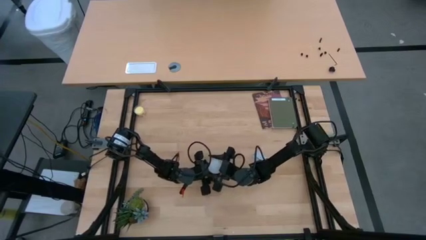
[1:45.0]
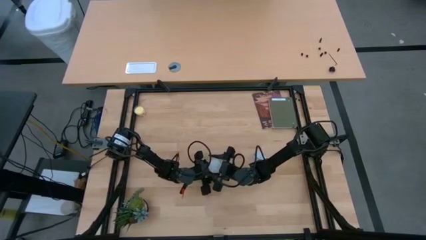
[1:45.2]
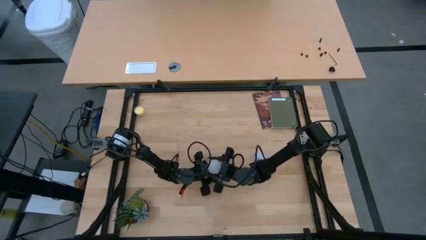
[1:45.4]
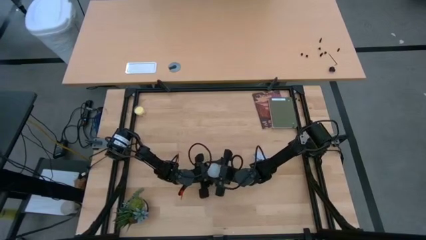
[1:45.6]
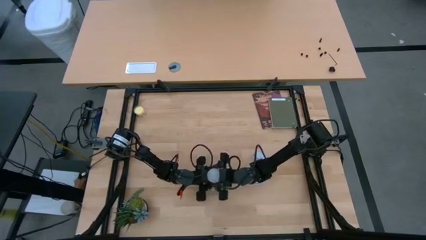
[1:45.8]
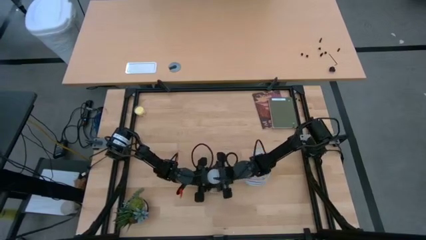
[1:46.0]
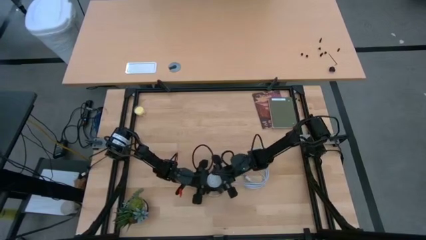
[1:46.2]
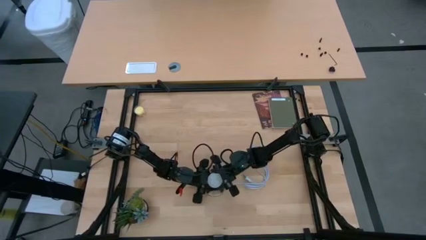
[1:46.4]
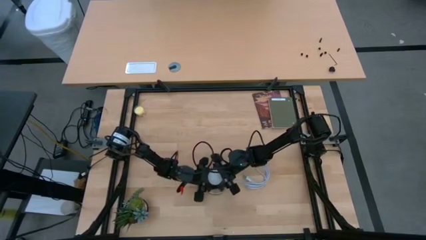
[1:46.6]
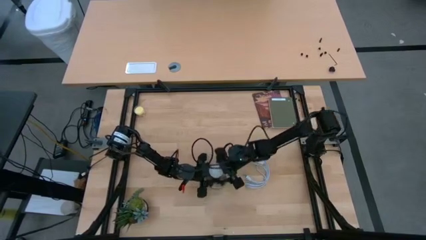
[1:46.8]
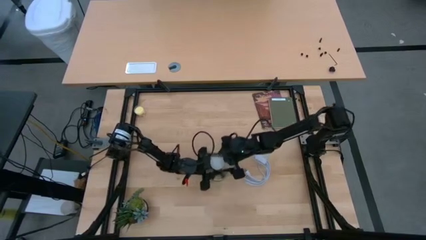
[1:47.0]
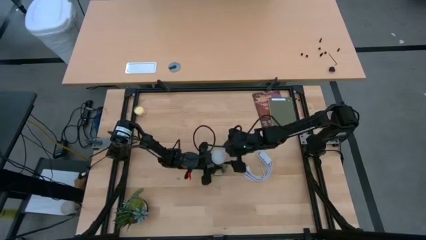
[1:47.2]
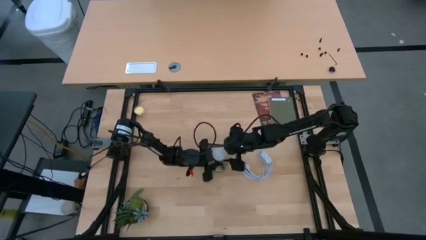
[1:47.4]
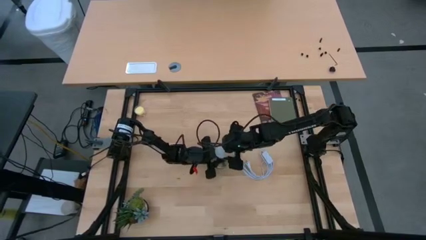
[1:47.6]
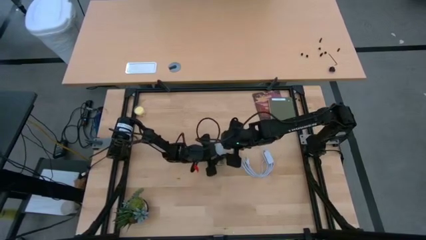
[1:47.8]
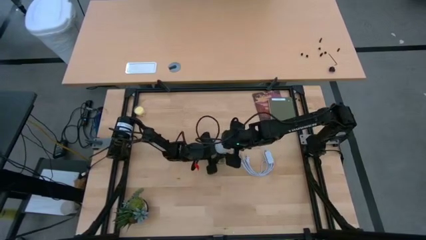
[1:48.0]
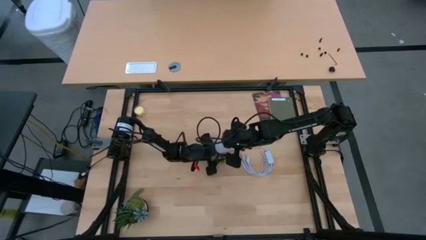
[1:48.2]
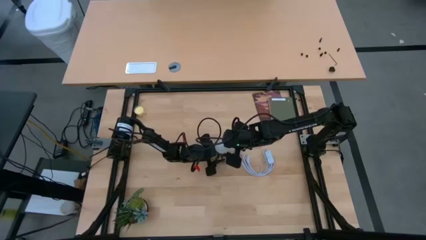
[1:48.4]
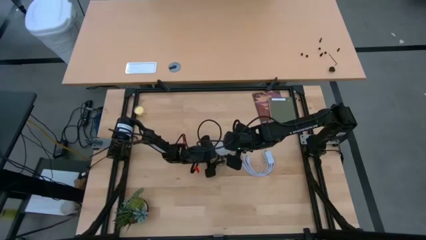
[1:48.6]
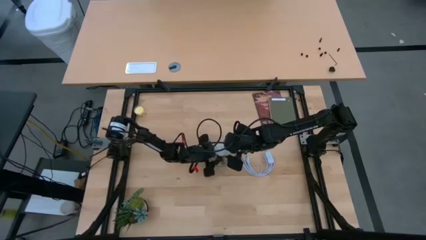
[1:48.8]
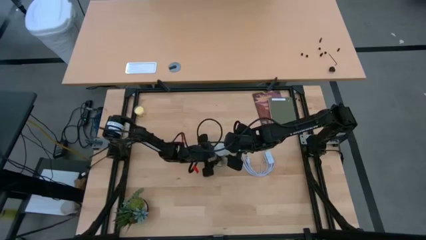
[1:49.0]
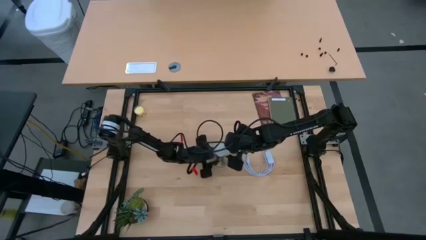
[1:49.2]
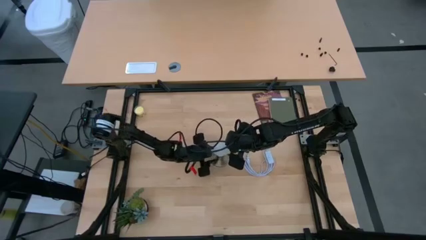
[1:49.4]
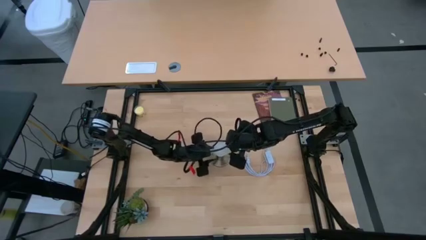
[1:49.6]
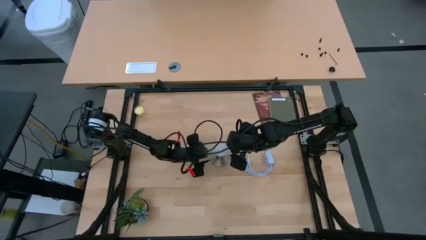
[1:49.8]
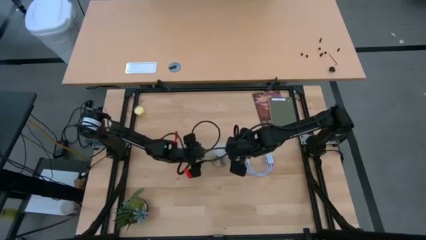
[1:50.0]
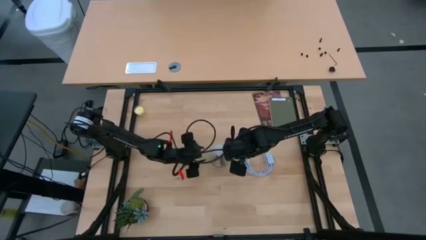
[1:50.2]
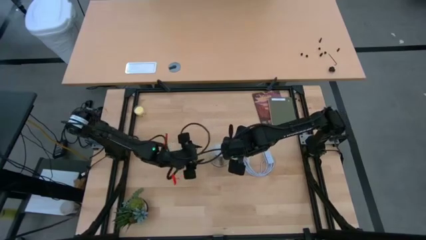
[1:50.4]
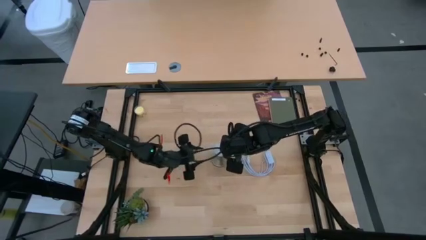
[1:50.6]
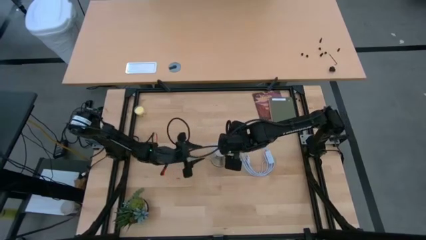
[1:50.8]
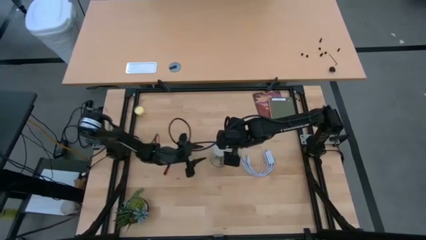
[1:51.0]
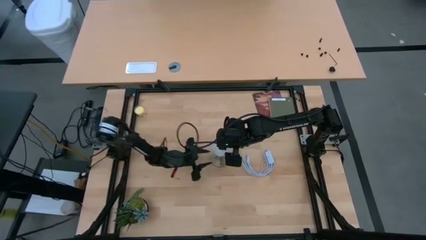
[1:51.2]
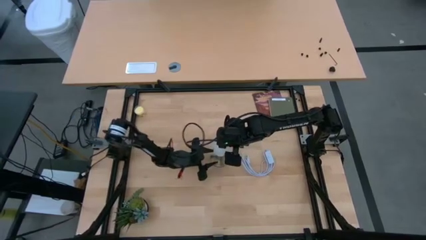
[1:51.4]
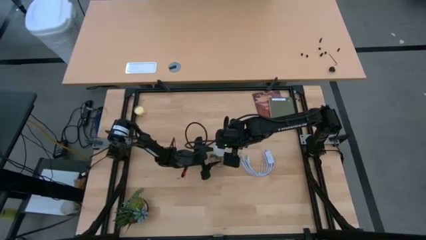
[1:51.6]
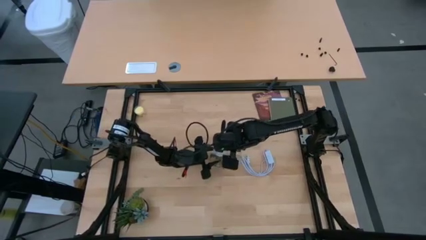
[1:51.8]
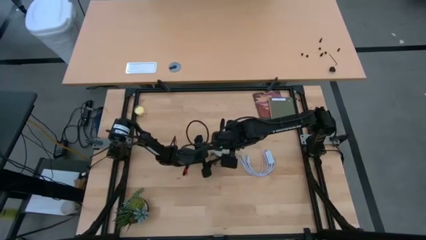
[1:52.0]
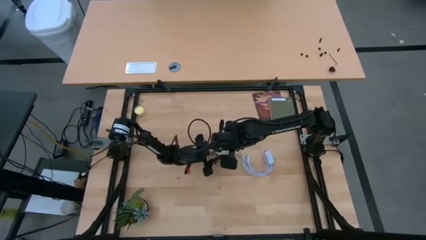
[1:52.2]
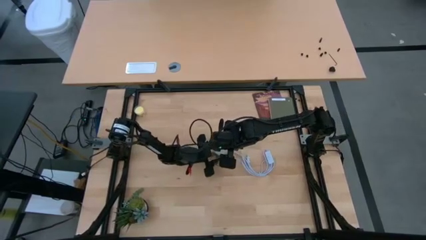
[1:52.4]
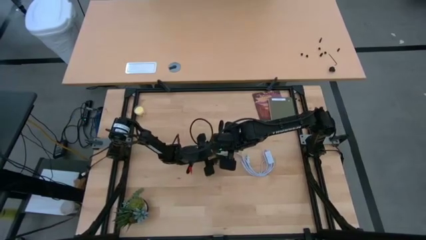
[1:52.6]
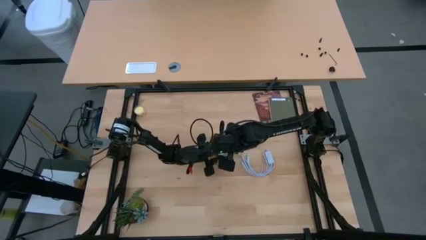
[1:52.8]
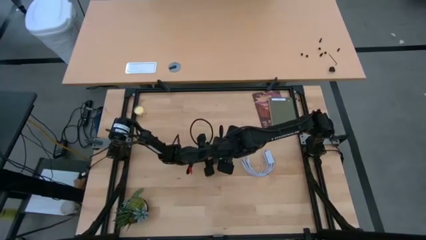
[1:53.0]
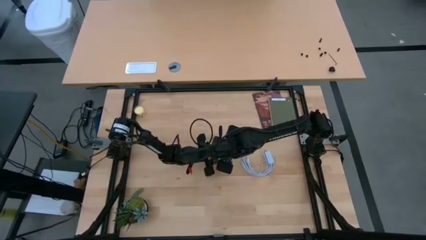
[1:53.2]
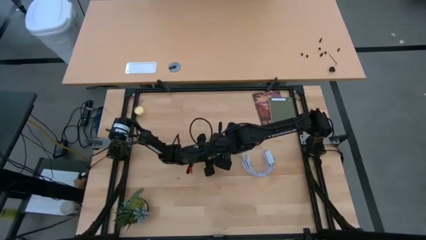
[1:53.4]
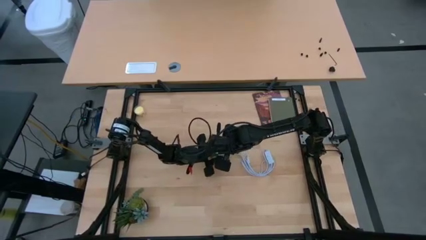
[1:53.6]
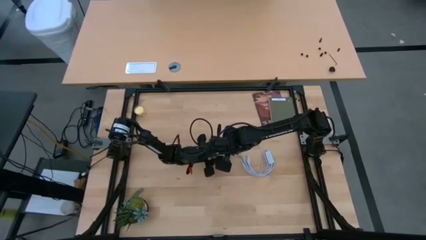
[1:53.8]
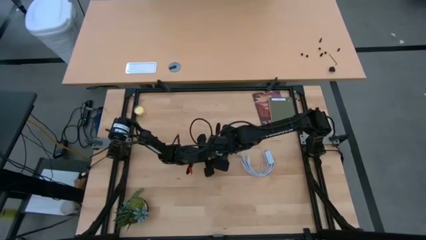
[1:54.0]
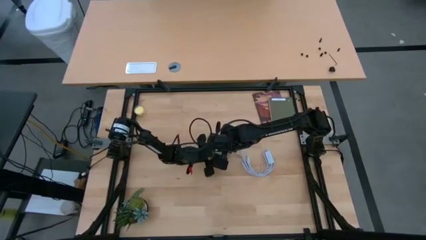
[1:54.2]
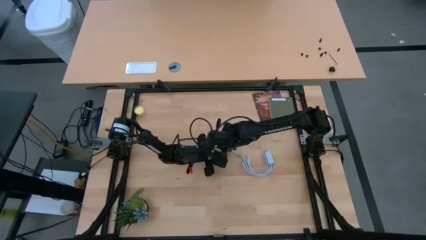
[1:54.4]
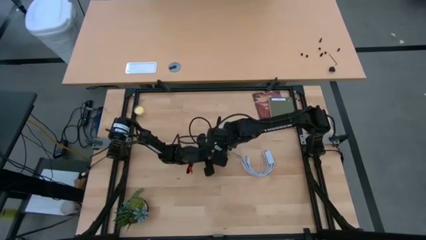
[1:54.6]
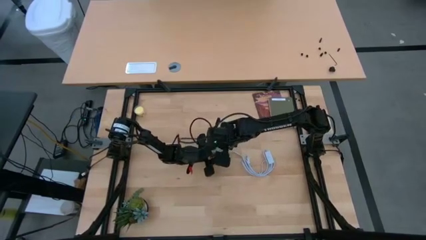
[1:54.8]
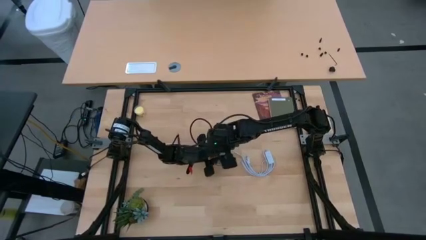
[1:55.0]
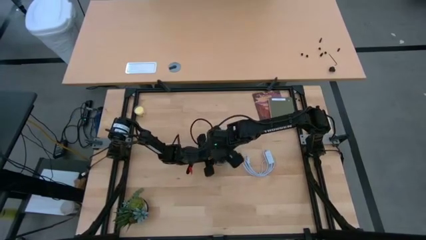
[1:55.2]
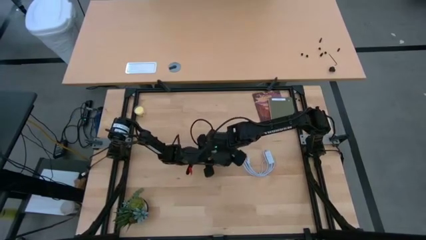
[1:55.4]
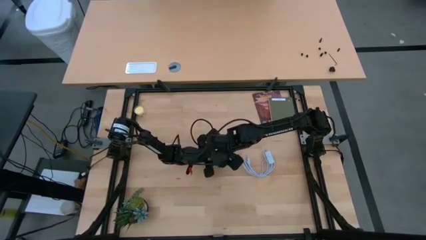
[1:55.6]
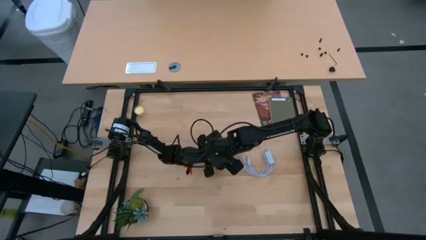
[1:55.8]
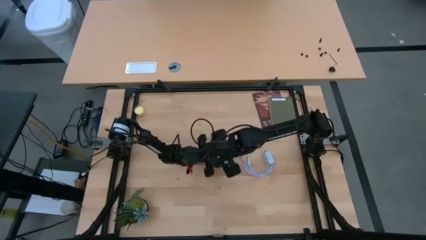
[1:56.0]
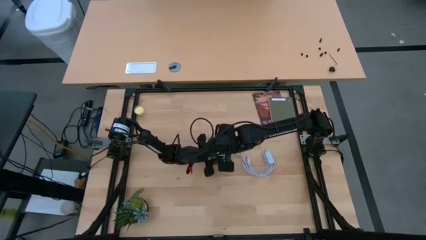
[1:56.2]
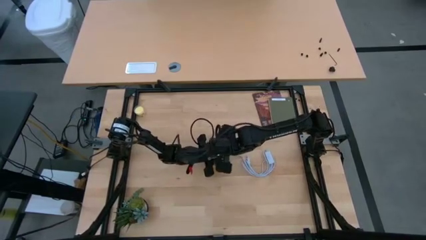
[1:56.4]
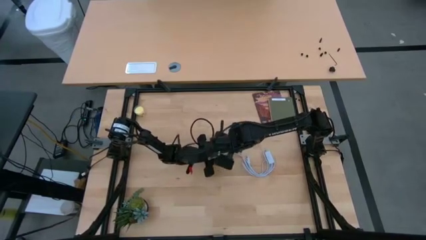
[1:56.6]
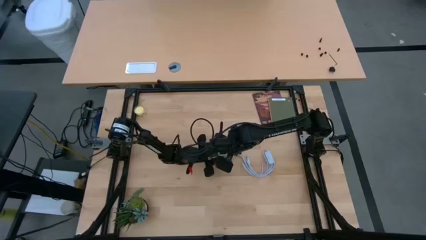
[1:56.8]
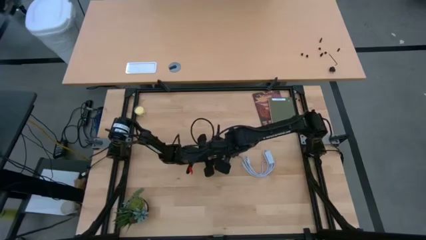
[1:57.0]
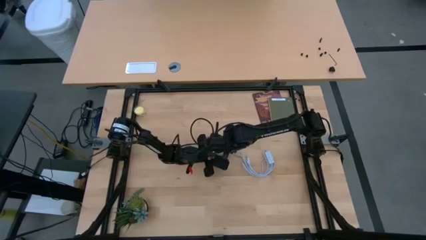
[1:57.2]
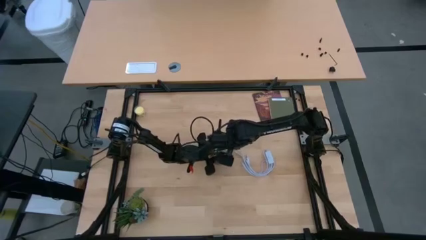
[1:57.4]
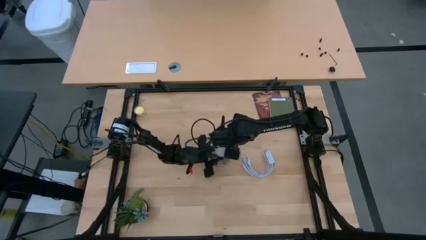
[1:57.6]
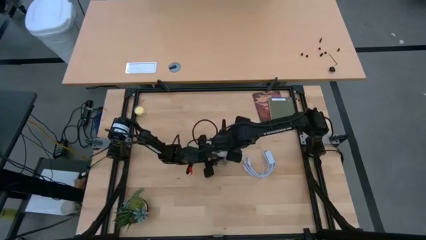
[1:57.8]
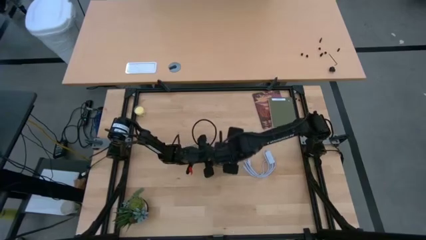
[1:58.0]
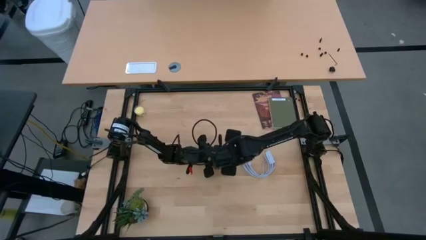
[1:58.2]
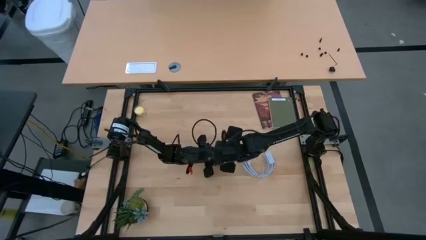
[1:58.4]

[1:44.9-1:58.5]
Task: Screw lightbulb
Remove the lightbulb from the lamp

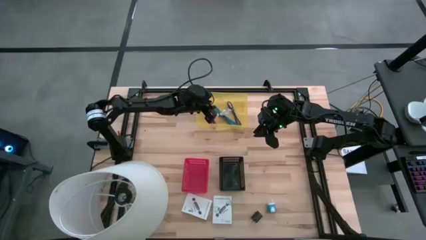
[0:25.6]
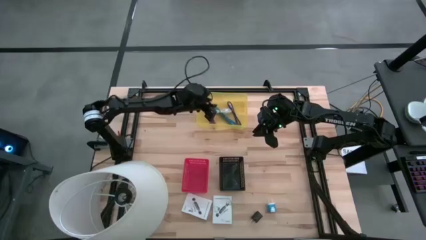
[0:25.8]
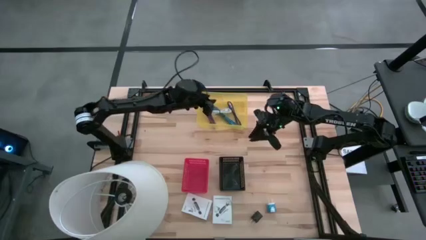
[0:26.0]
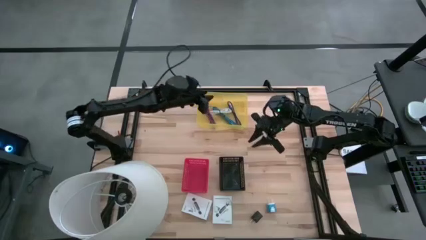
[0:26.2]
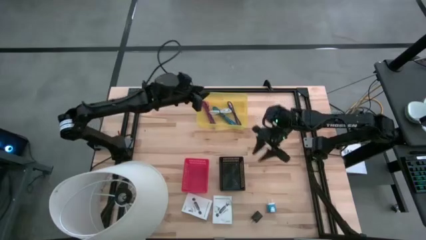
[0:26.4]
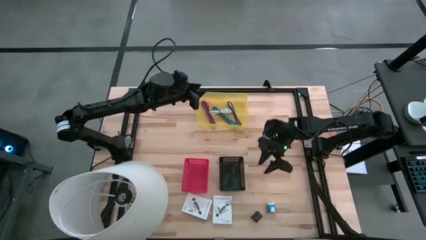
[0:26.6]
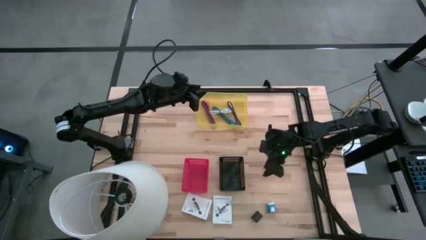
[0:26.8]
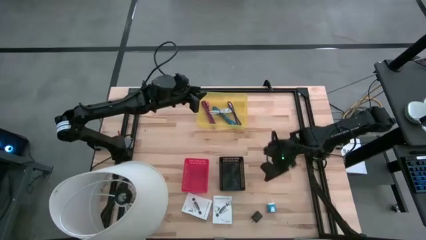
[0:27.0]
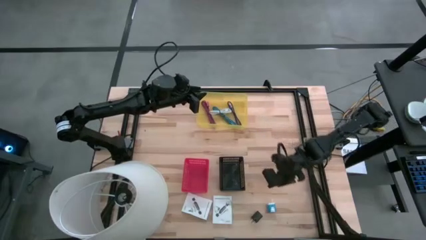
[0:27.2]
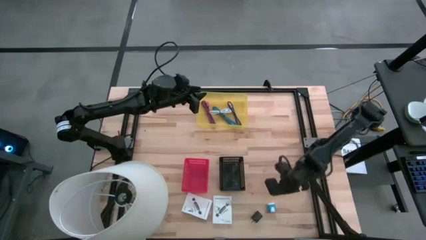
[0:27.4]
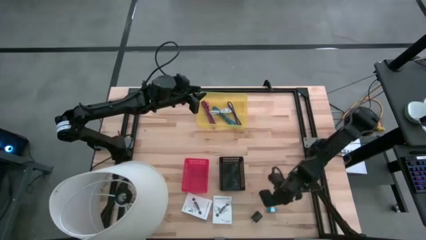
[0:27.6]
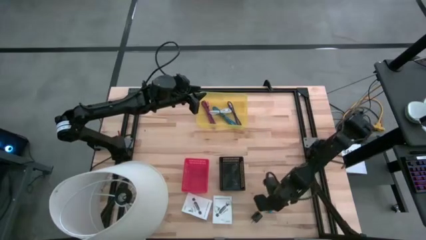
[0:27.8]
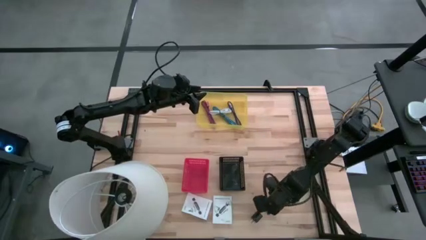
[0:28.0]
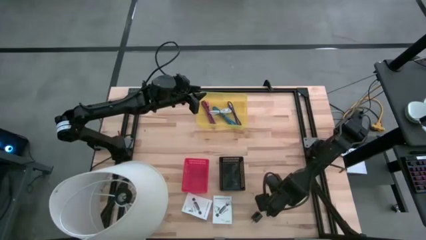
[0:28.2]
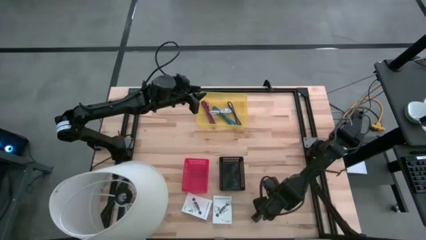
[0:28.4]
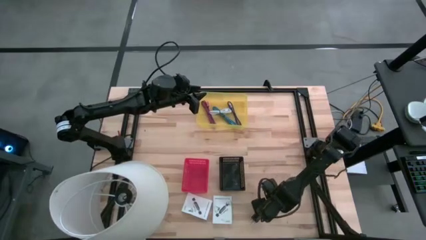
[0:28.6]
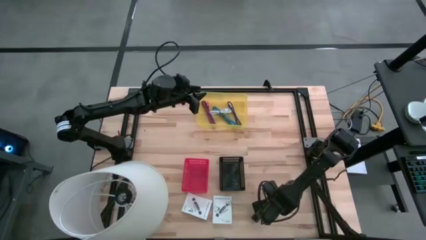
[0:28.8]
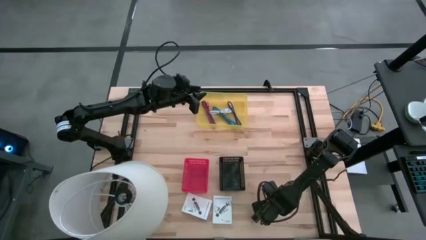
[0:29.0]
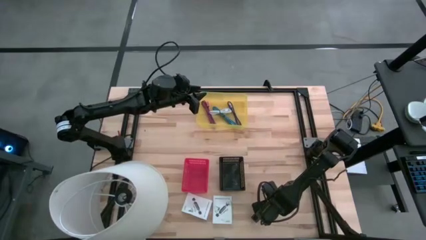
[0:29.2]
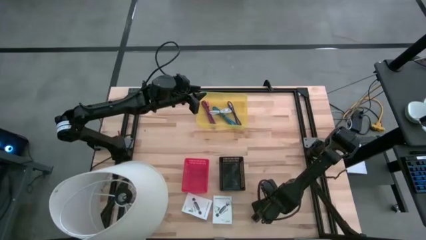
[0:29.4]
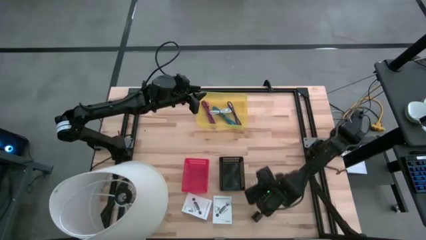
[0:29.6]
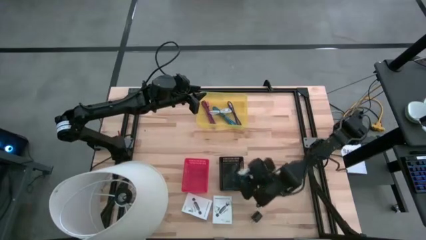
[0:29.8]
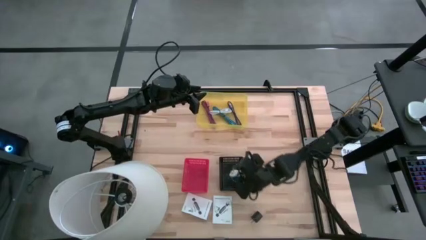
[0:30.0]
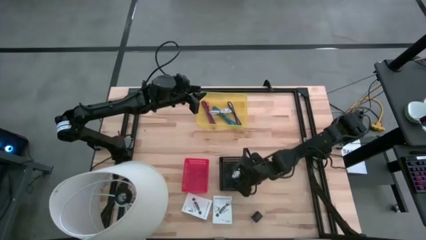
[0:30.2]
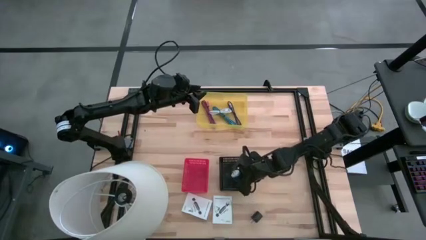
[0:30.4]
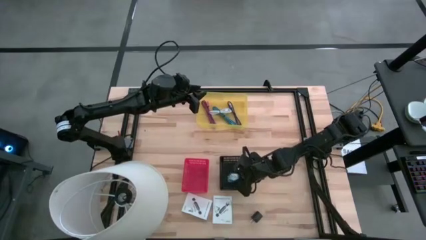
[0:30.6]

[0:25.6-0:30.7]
Task: Pick and place items into bin
Put the blue charger adapter into the black bin
